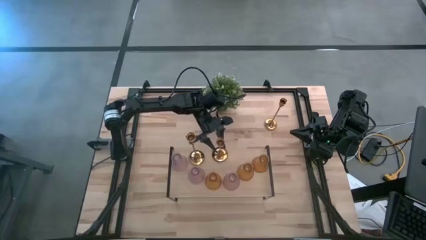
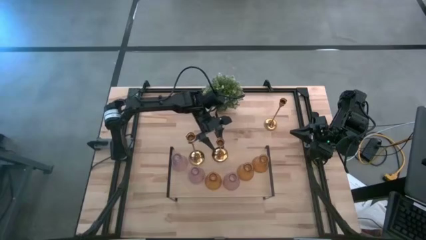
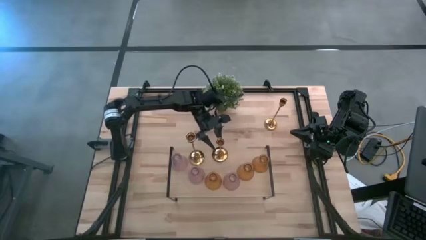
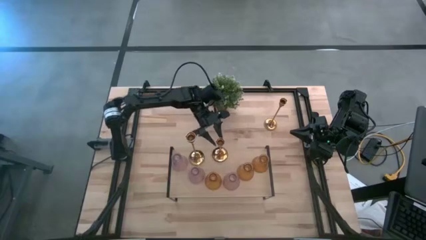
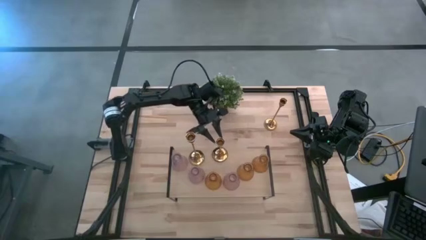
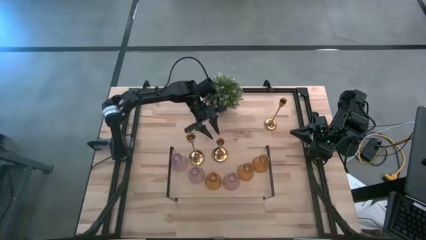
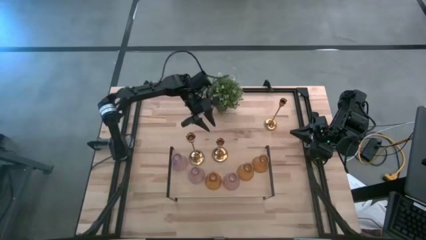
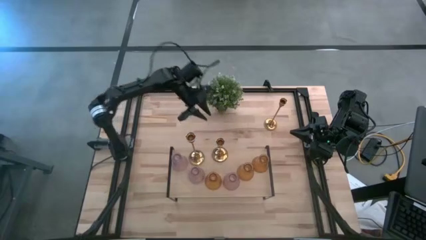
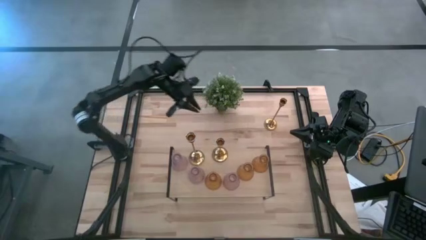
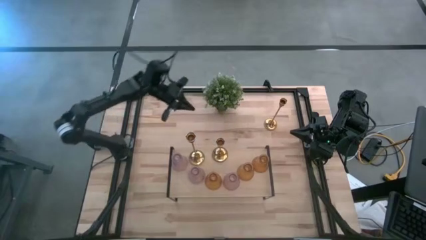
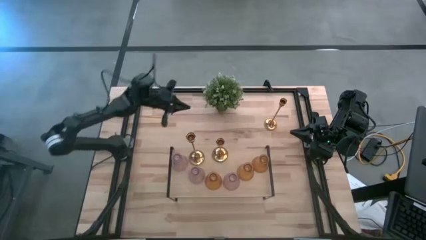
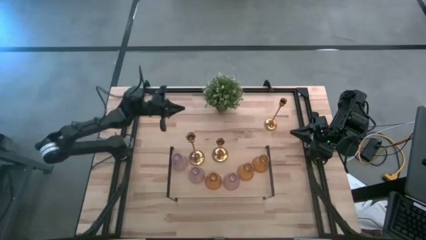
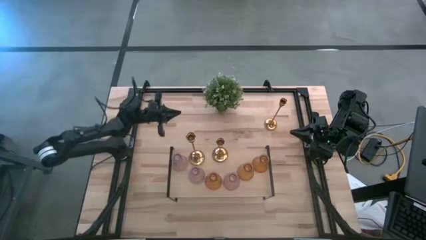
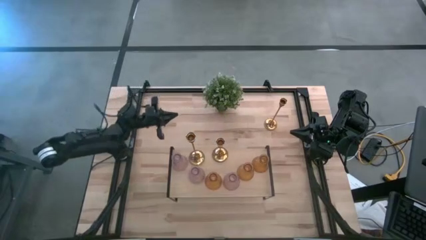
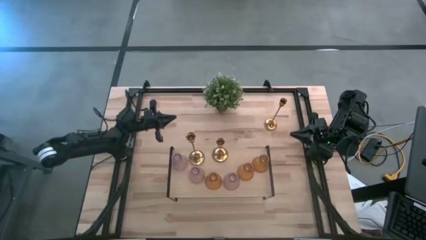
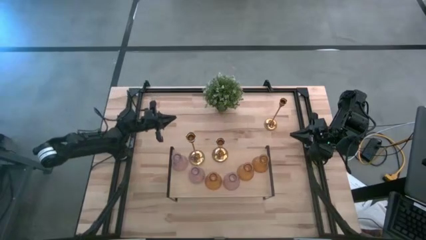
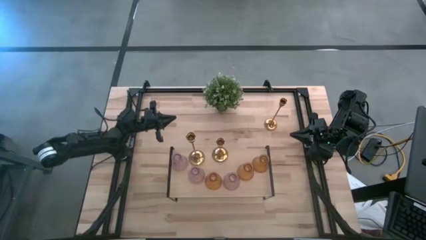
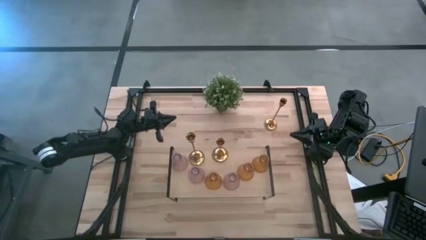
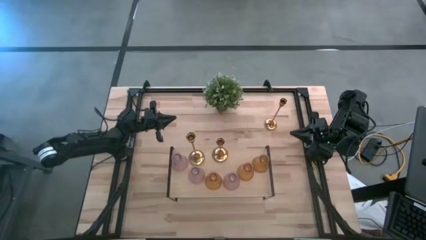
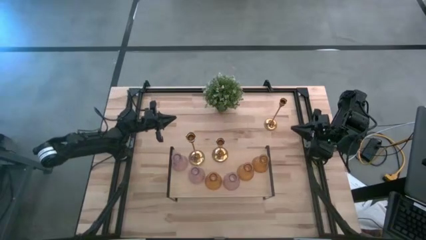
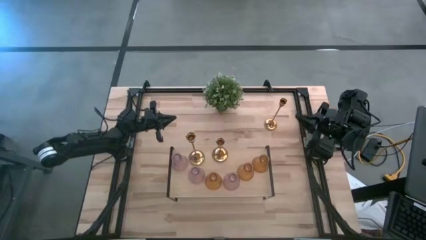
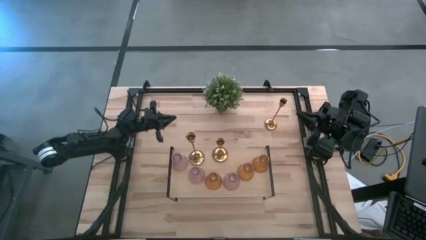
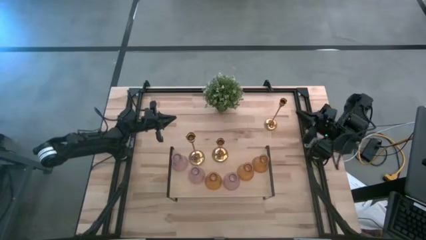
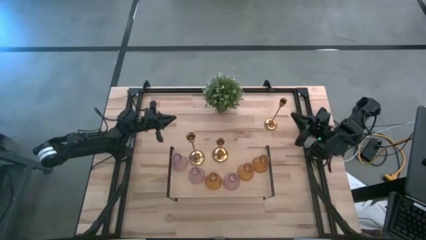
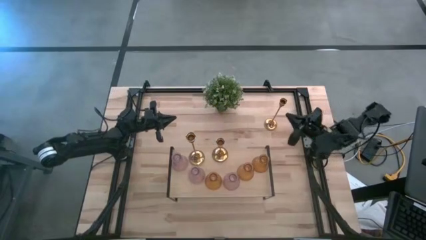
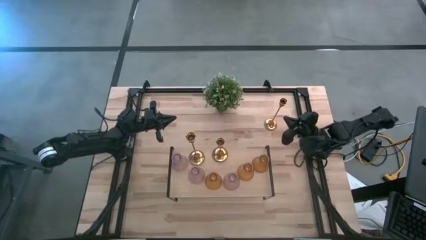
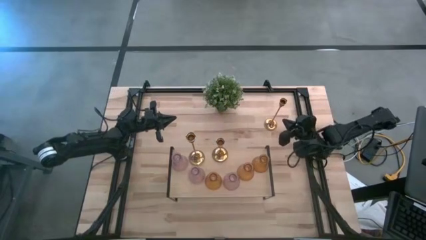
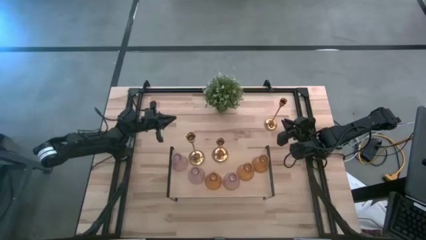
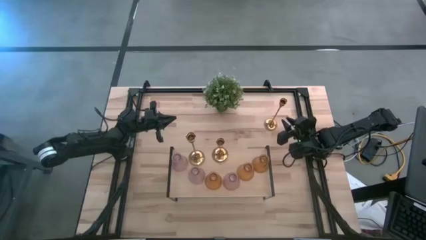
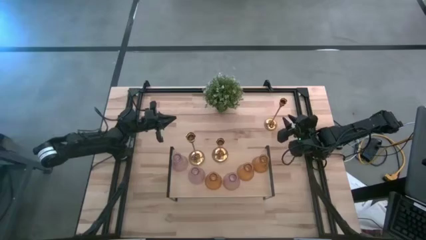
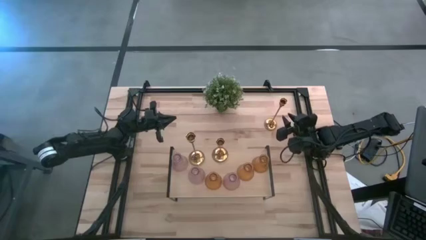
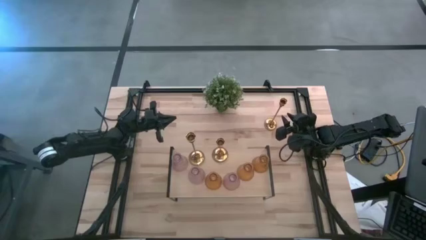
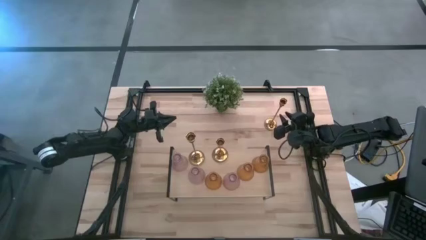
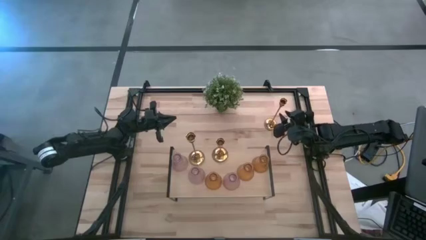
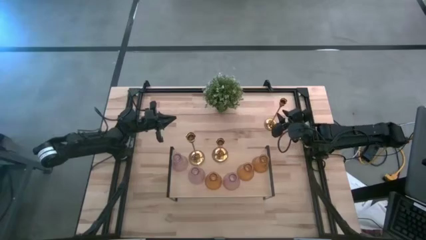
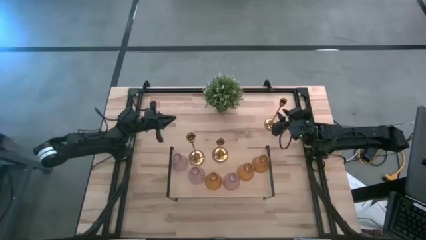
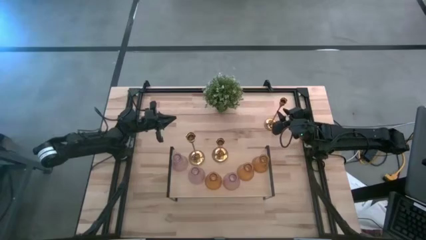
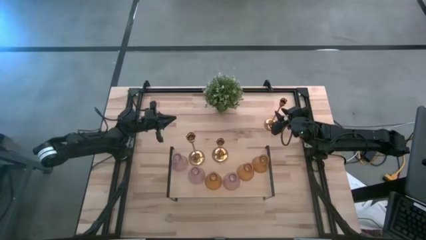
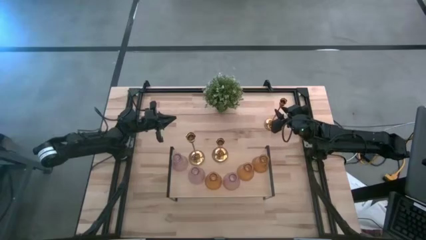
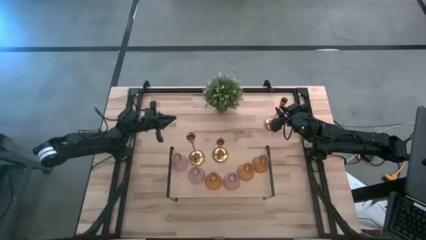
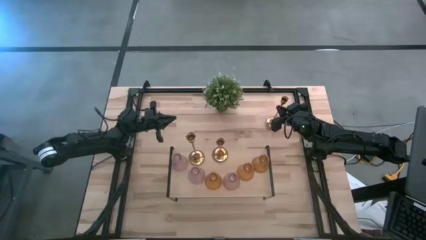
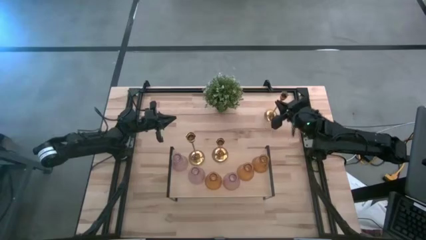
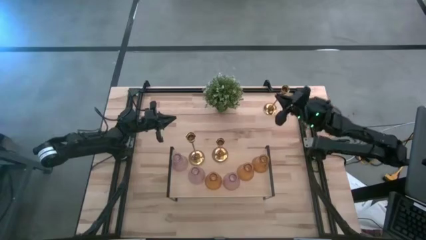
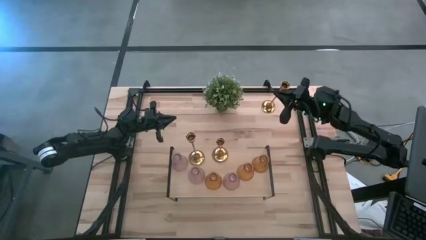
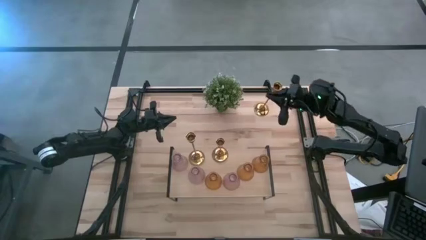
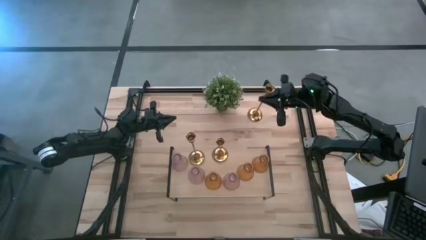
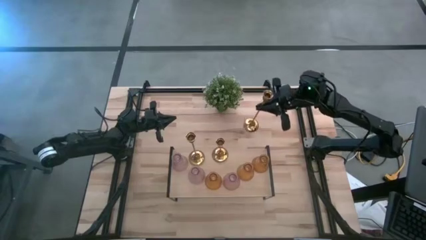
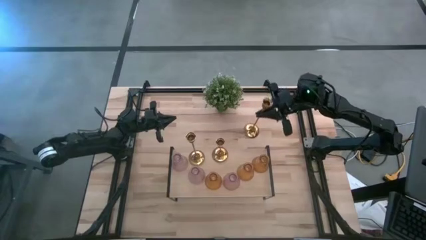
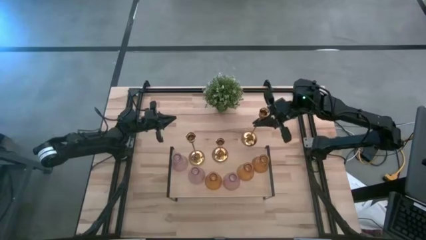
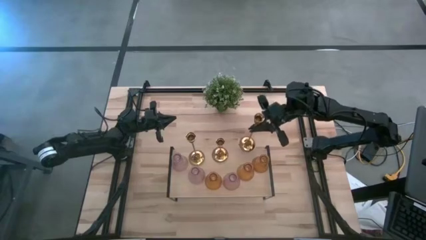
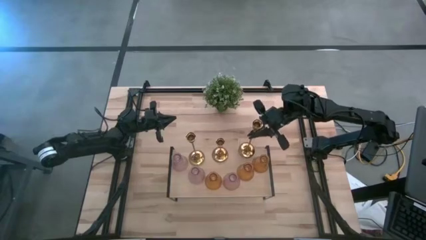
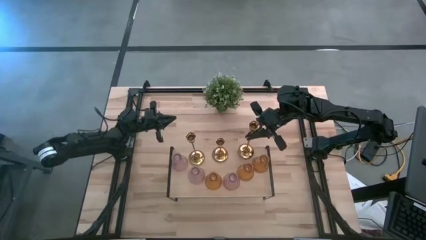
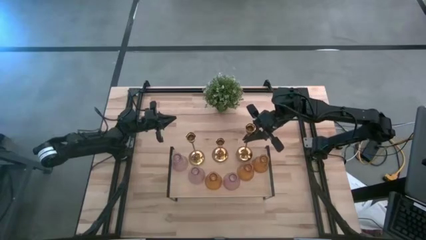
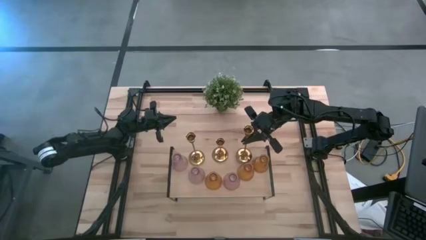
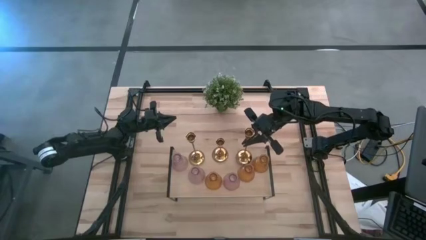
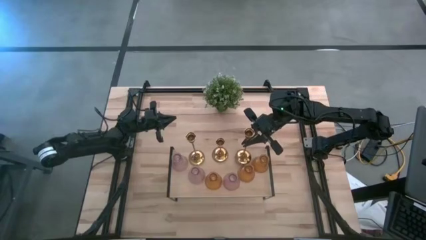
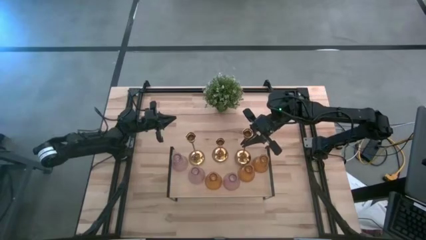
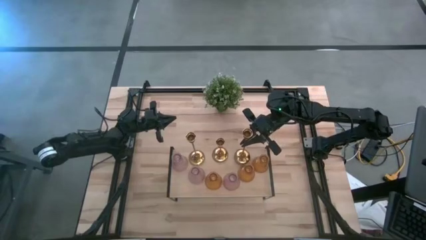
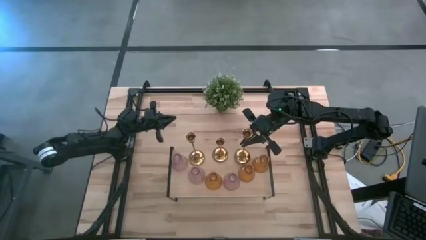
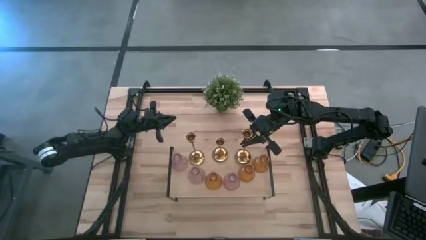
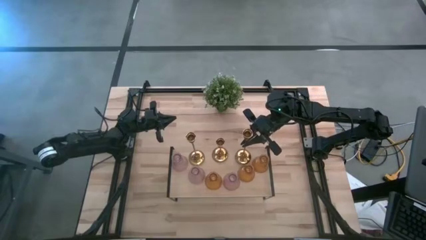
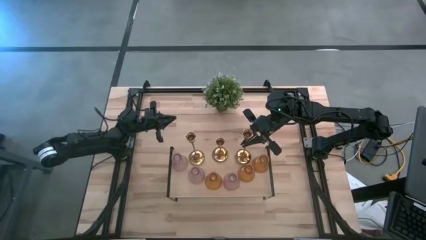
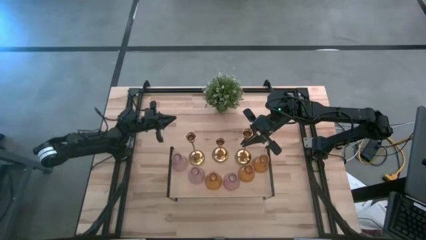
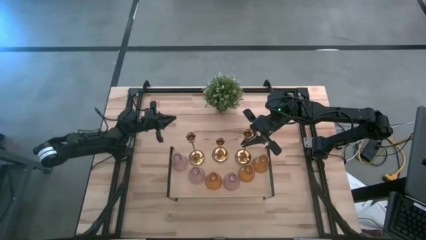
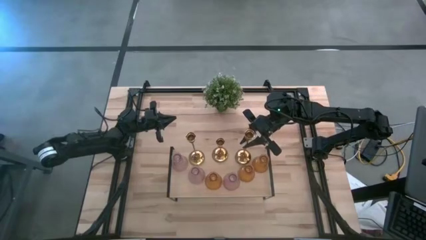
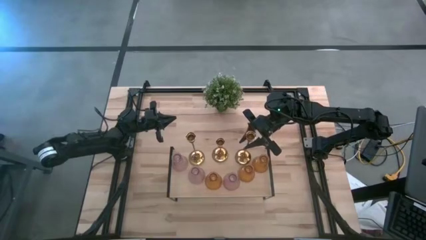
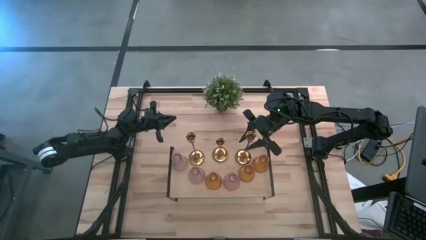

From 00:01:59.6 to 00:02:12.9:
Task: Pick & Place candle stick holders
Put the gold candle holder on the shelf
